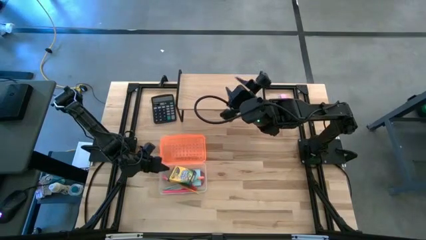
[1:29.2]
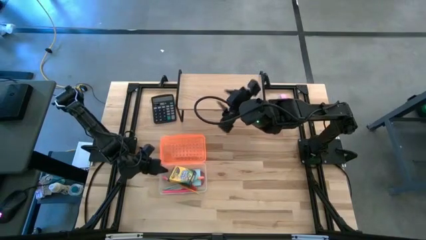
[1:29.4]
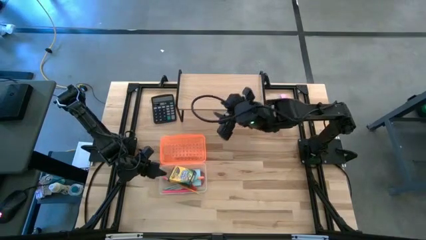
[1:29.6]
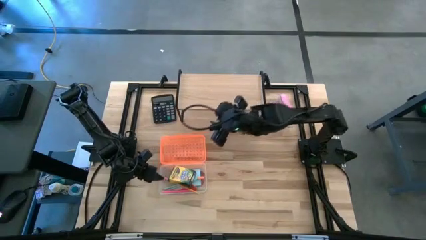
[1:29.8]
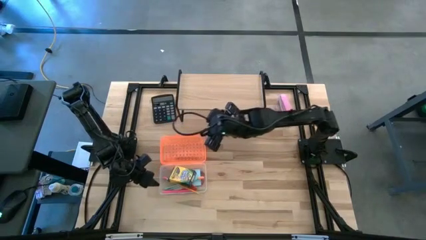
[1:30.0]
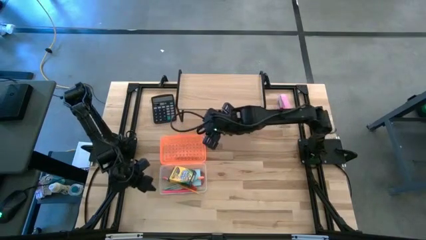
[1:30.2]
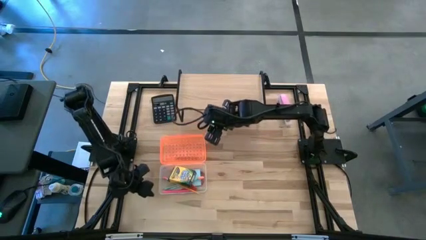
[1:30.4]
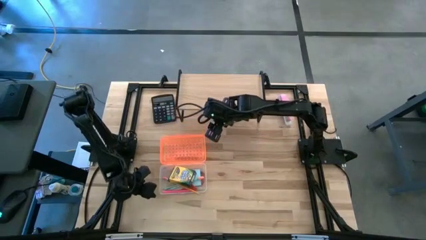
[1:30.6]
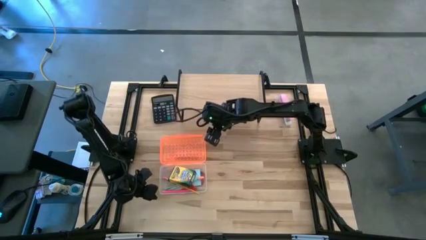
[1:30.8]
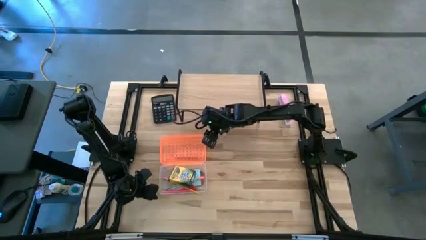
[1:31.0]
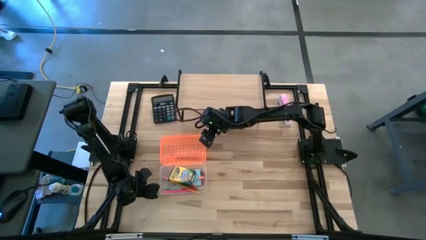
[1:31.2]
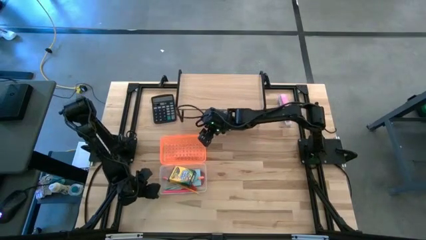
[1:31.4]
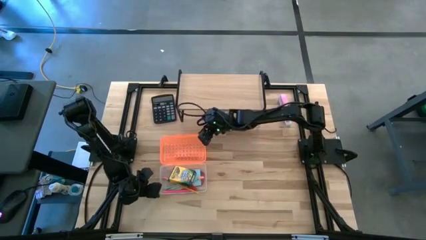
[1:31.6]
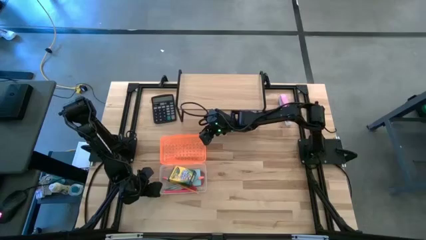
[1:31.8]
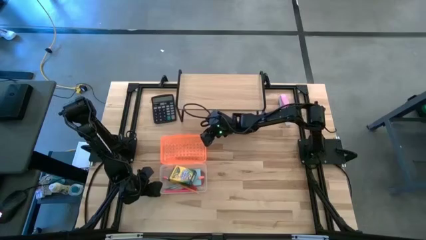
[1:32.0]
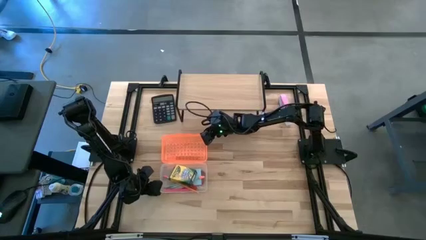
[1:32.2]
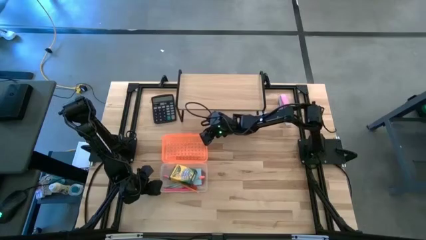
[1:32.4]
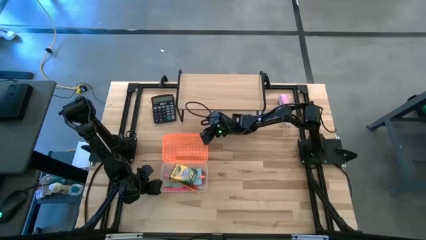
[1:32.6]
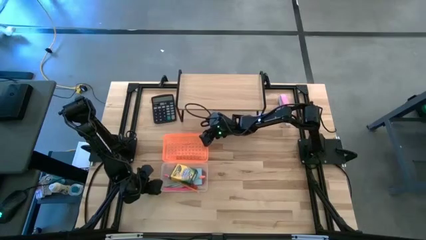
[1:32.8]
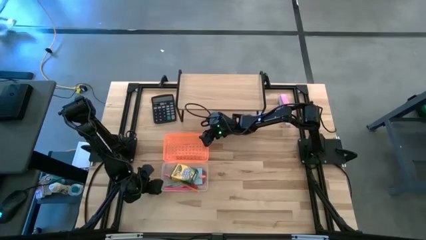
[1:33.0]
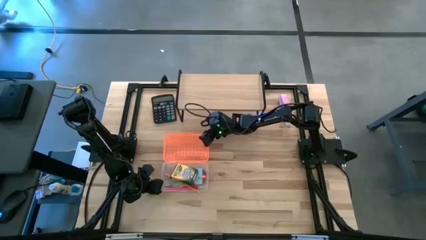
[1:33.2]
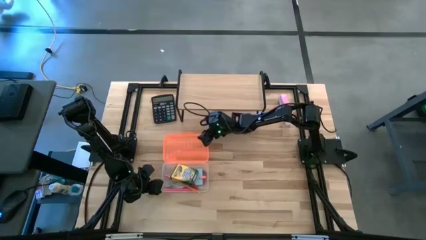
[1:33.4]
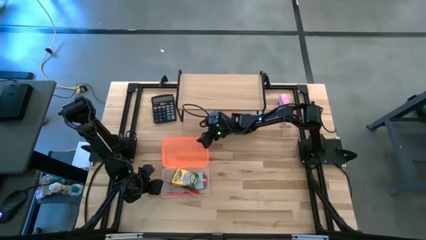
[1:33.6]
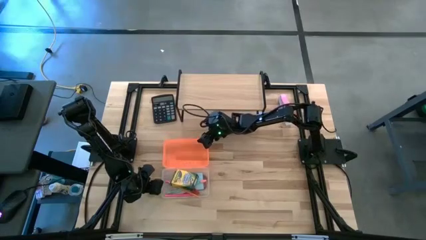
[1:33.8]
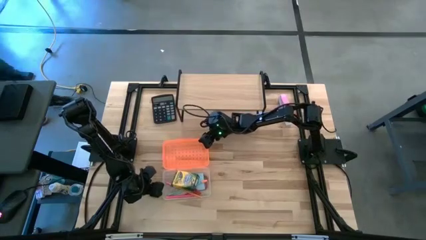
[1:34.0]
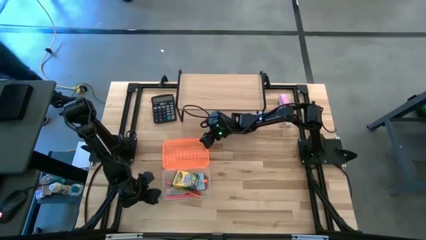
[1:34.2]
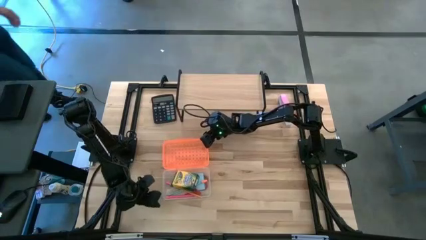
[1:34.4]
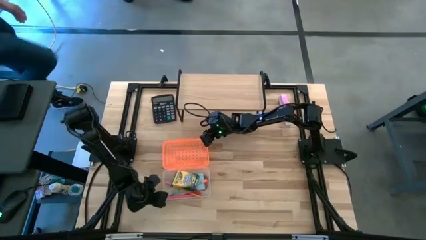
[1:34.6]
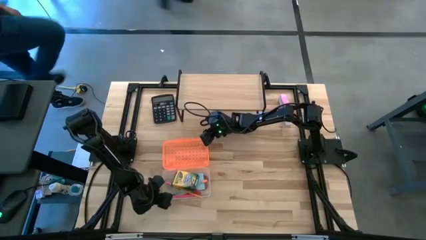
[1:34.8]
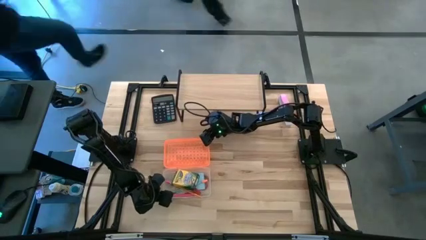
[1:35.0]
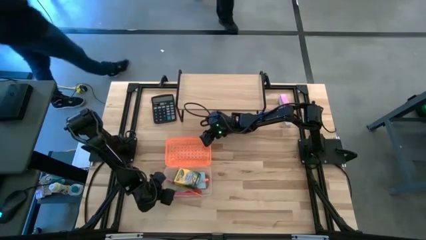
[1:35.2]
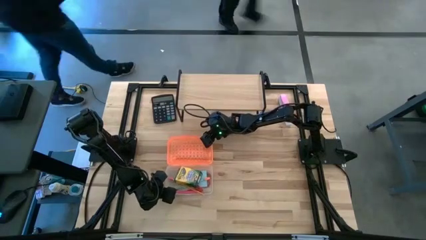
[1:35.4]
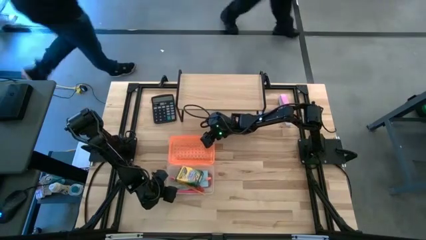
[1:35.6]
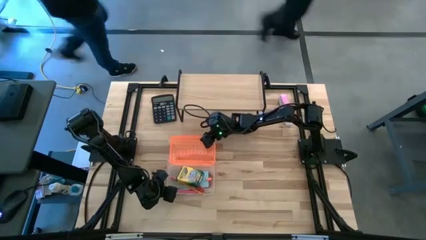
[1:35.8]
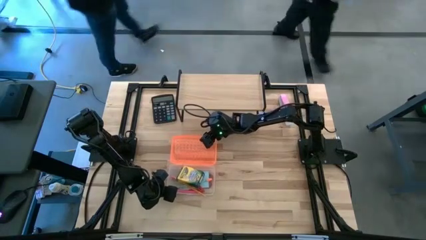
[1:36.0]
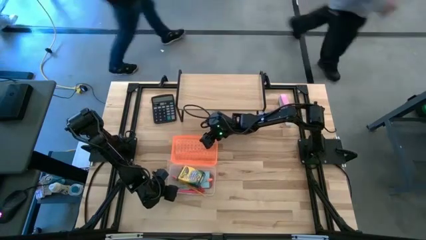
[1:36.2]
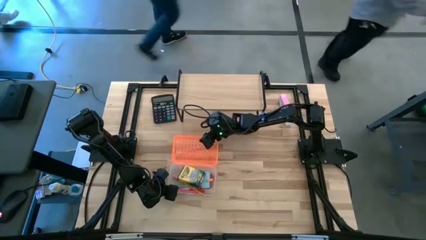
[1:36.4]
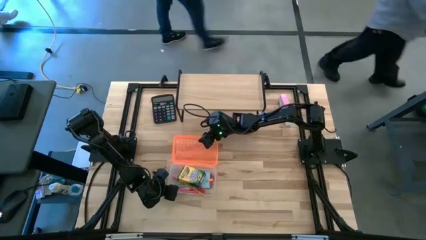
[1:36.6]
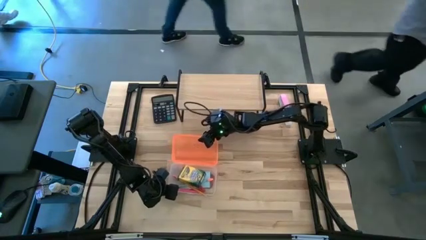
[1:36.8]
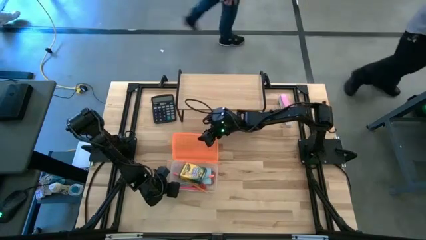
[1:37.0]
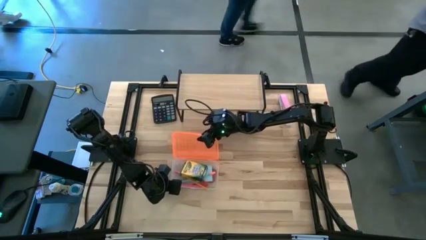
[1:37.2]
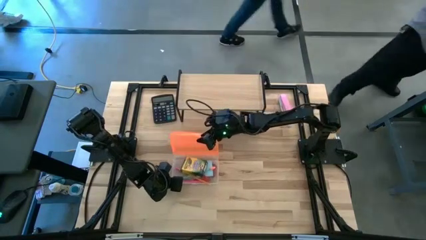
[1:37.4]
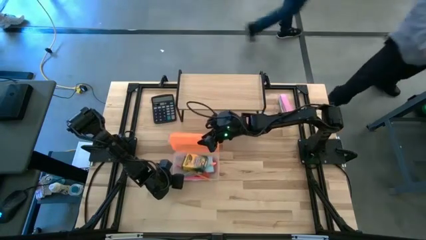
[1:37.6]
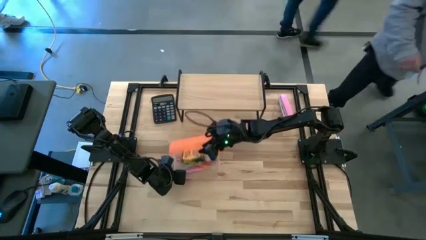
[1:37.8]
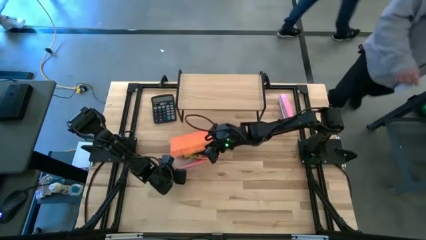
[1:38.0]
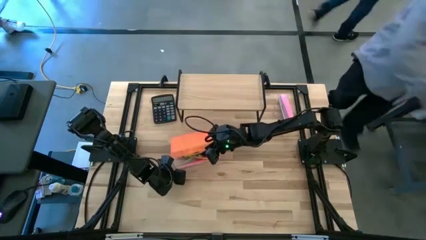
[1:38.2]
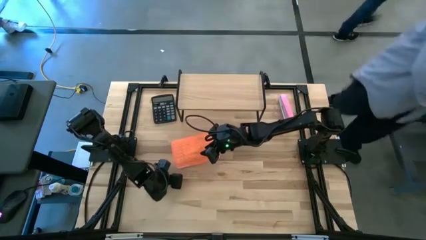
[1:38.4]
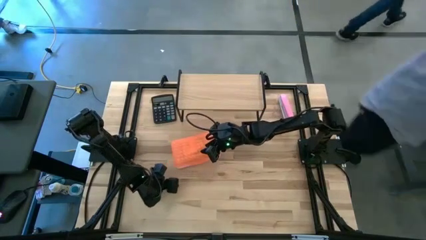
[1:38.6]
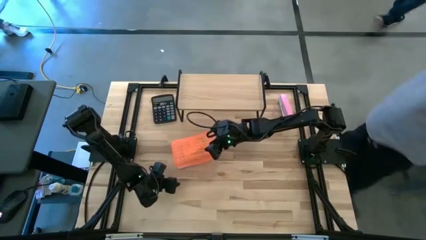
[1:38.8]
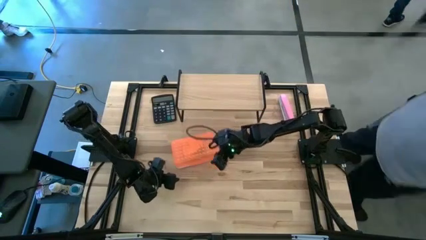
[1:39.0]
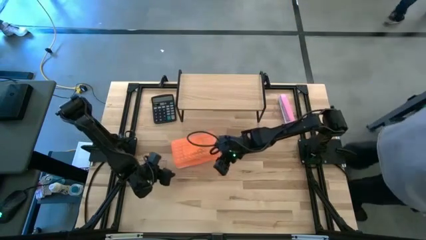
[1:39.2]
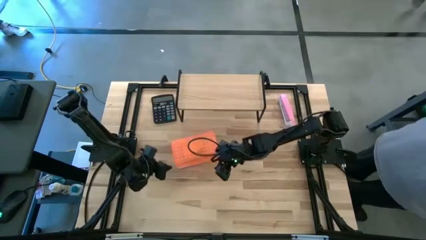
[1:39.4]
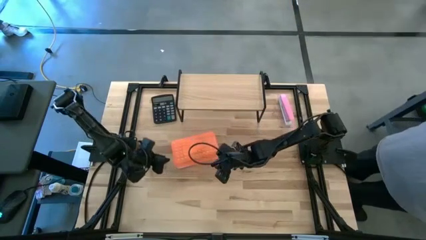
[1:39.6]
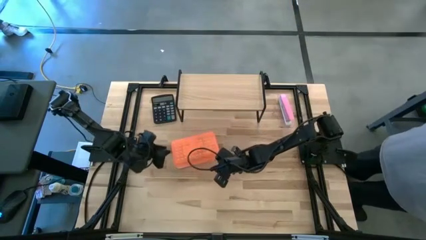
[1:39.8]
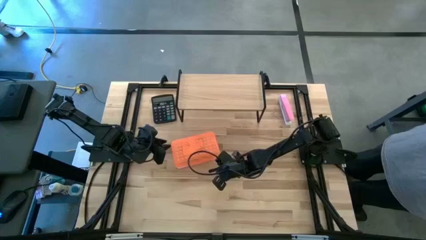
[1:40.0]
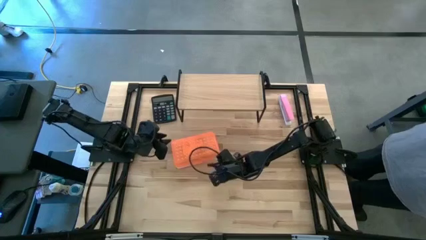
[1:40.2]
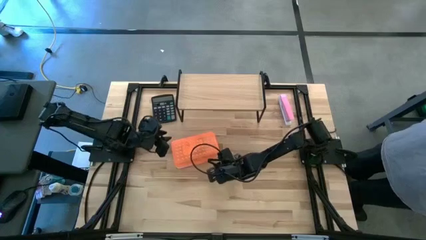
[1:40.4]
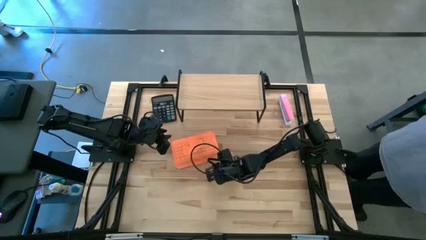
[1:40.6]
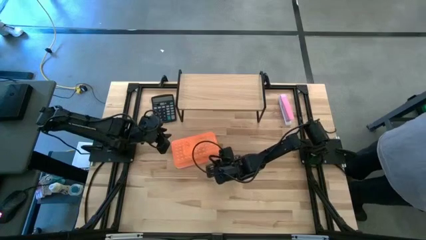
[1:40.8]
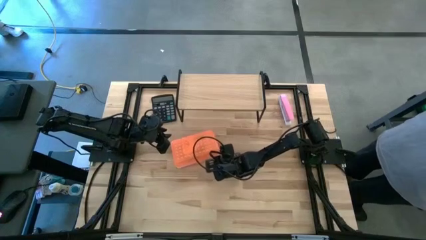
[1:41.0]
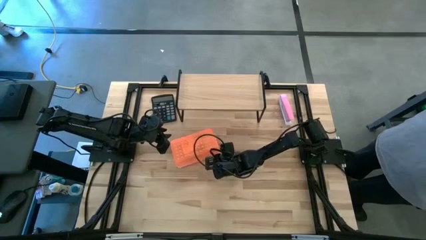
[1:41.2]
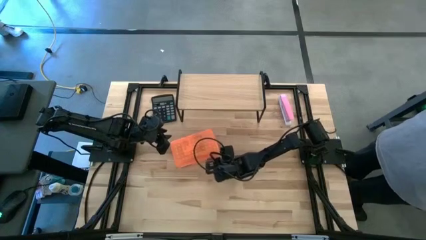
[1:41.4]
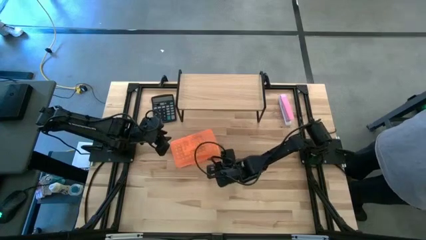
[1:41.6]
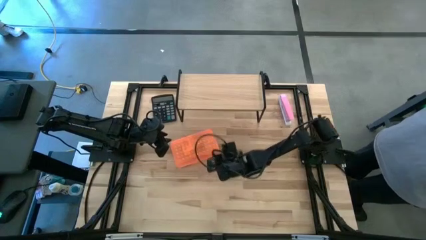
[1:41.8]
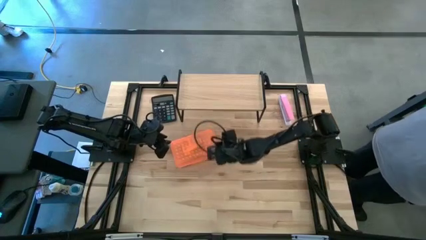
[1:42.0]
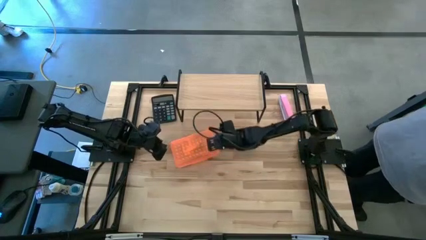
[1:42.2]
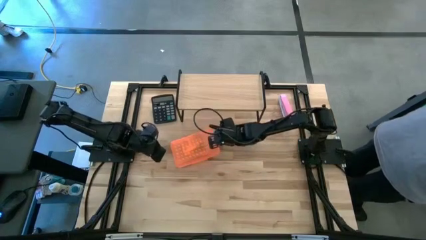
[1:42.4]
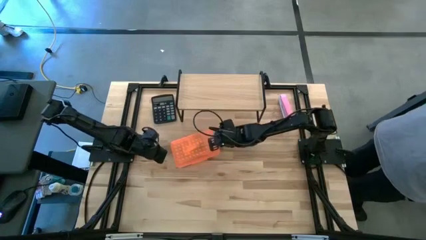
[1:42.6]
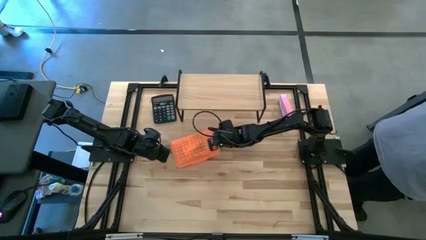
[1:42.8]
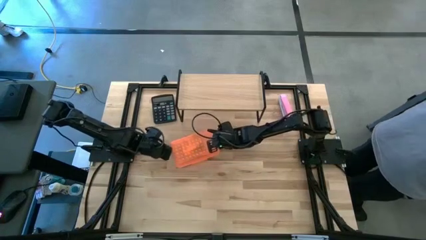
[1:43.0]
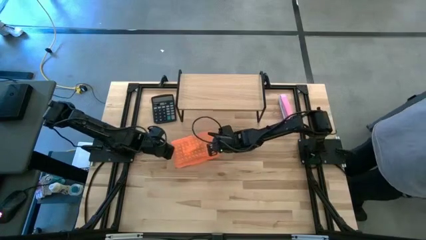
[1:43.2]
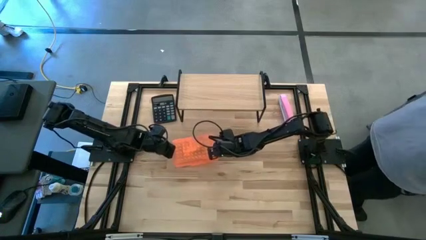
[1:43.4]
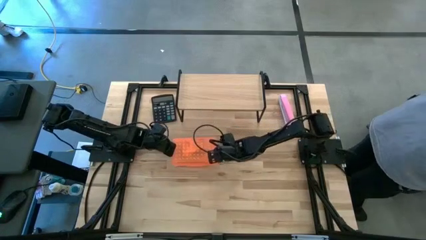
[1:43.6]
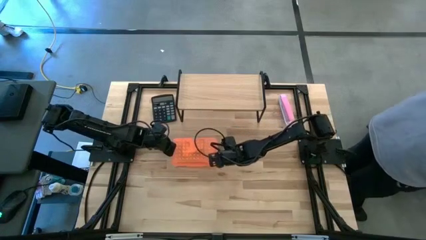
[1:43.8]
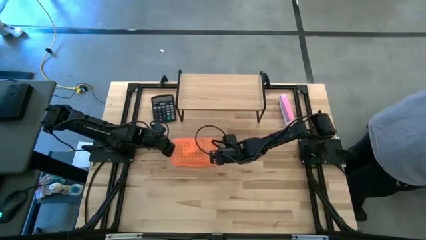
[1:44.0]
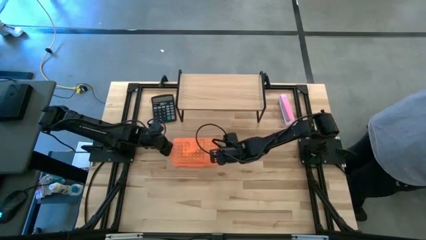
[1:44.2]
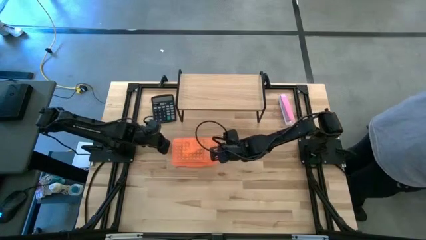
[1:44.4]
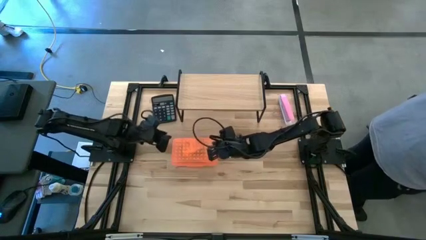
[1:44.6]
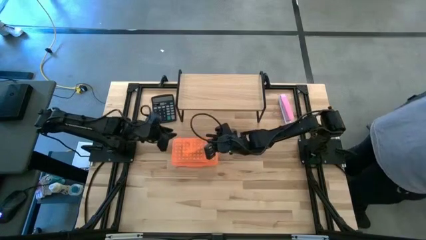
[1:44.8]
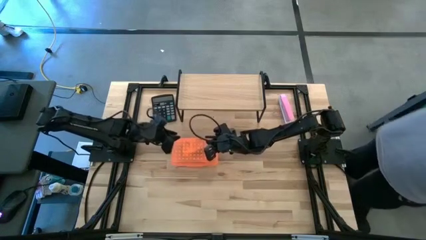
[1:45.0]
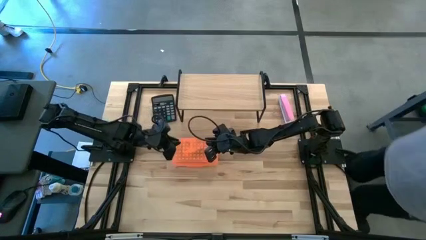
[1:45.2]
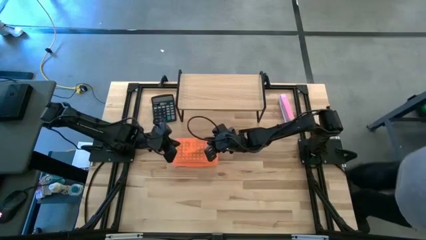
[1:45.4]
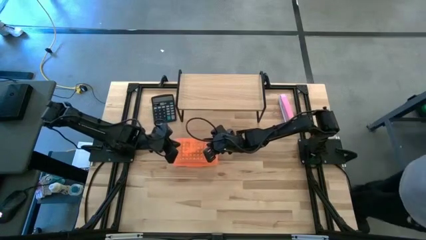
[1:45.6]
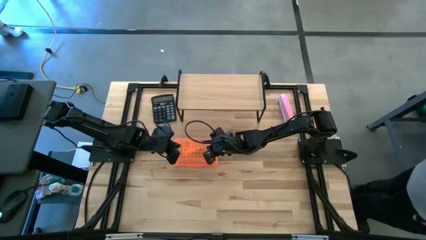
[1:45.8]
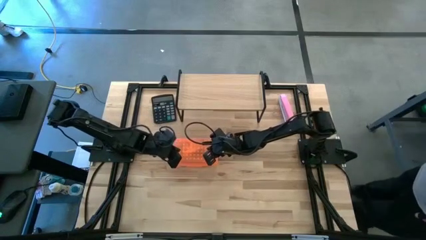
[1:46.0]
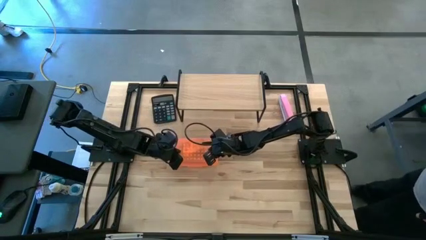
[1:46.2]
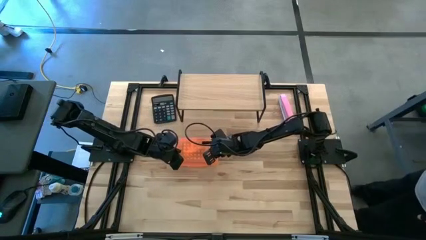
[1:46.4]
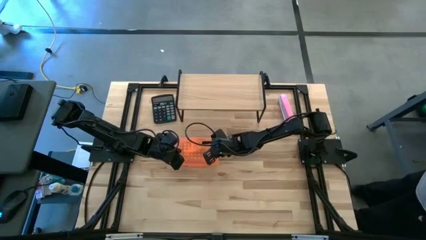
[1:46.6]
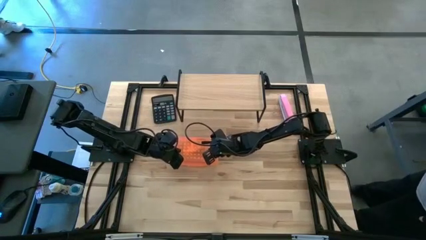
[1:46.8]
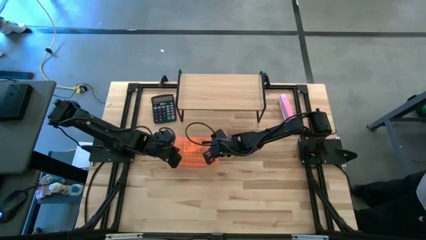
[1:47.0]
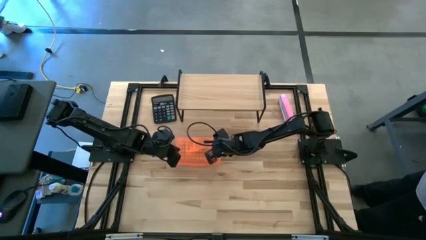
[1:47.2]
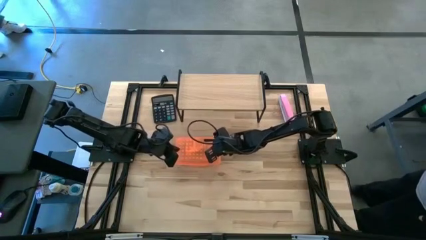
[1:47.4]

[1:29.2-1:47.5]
Task: Pack school essentials
Close the supply box
